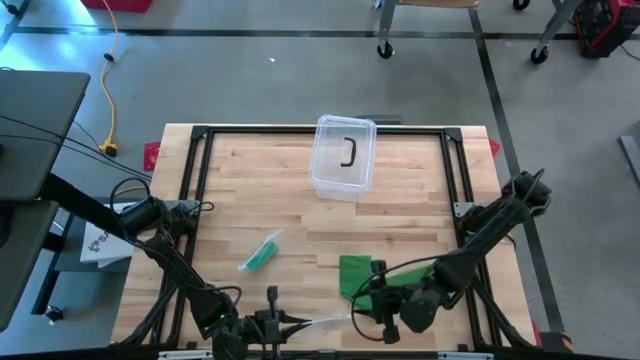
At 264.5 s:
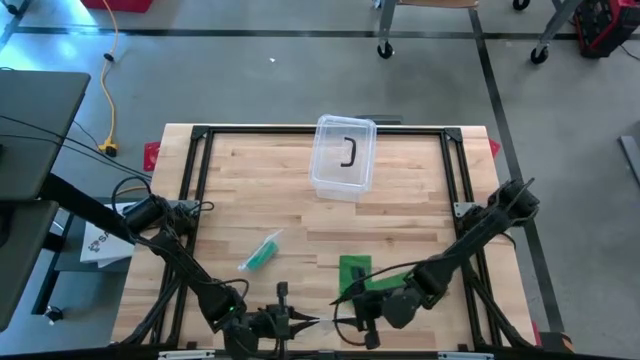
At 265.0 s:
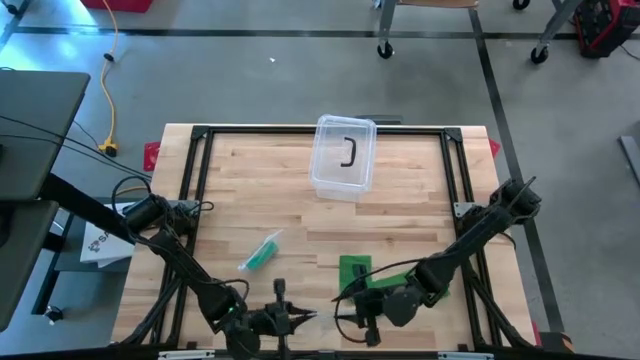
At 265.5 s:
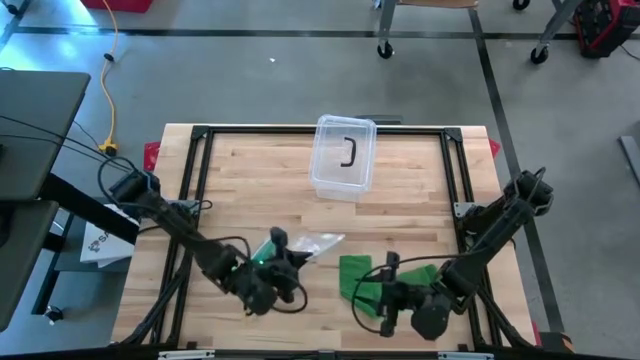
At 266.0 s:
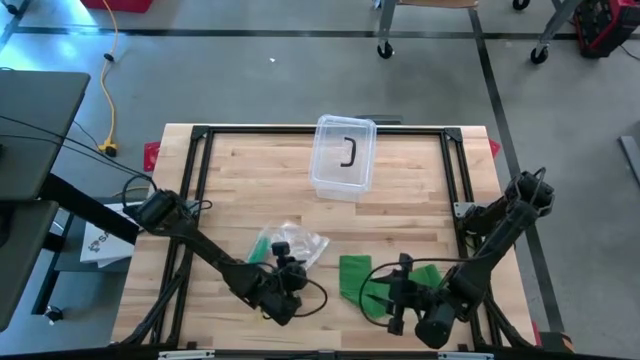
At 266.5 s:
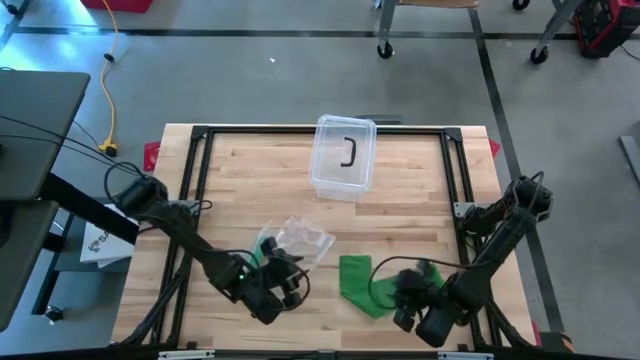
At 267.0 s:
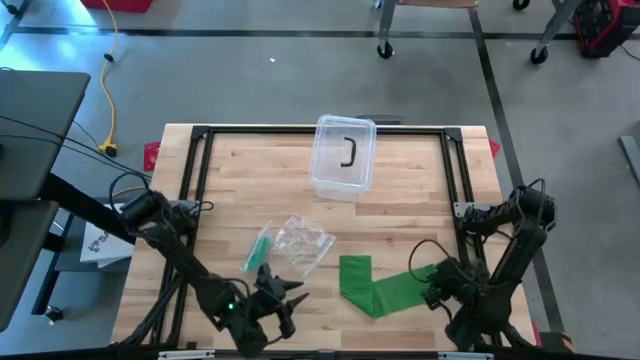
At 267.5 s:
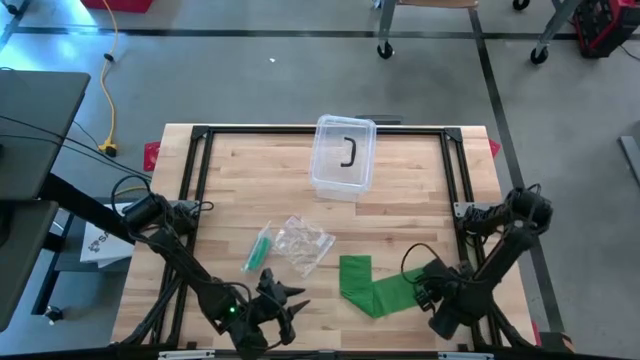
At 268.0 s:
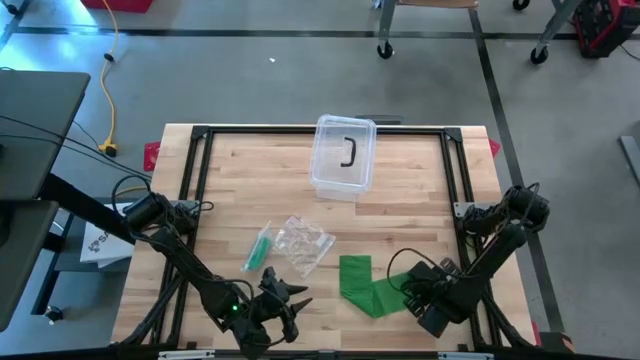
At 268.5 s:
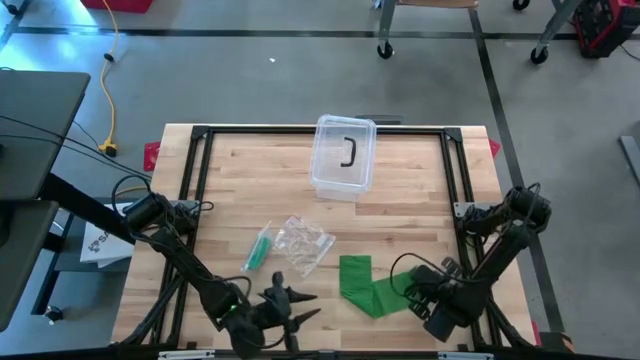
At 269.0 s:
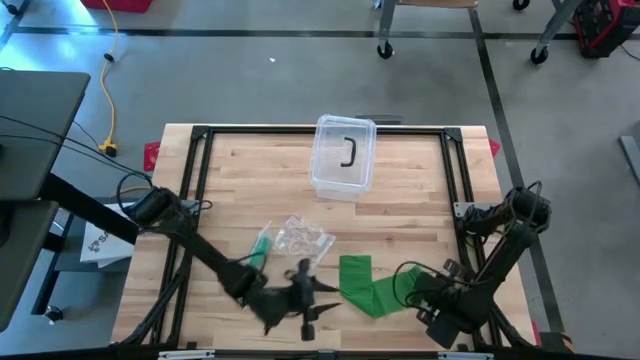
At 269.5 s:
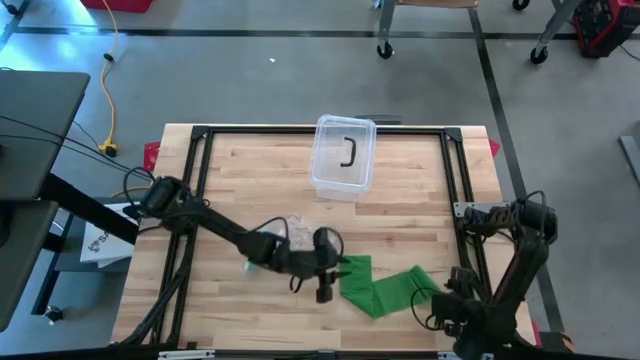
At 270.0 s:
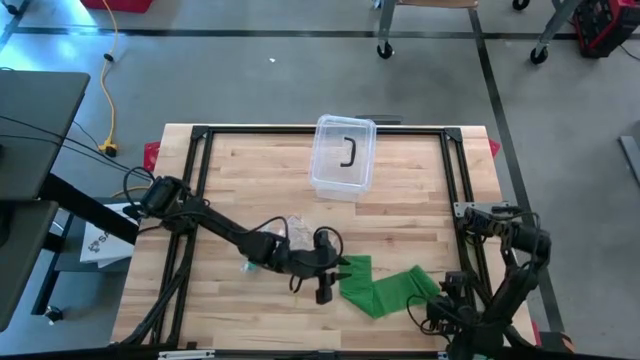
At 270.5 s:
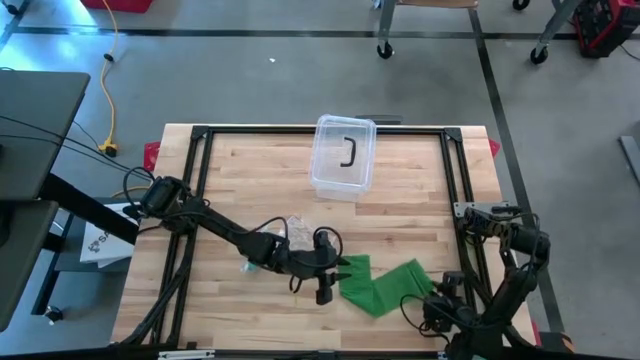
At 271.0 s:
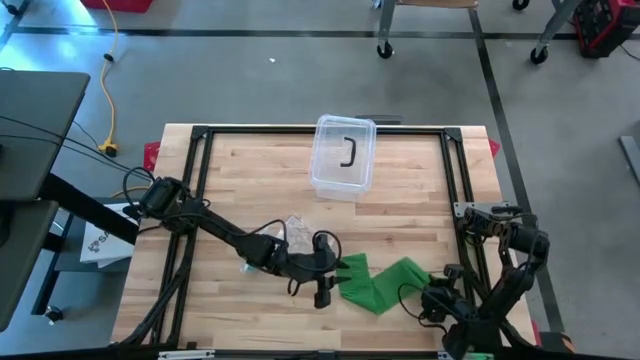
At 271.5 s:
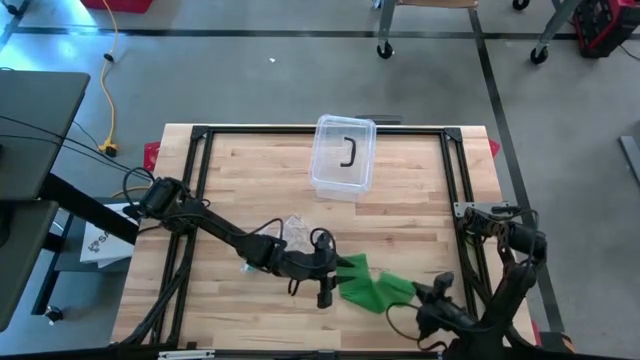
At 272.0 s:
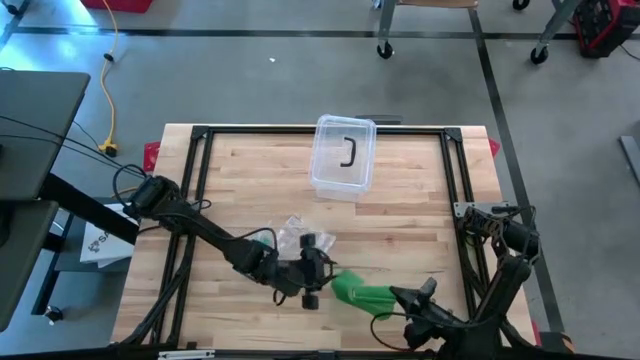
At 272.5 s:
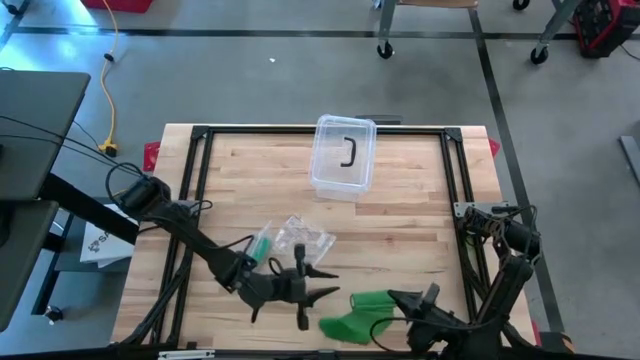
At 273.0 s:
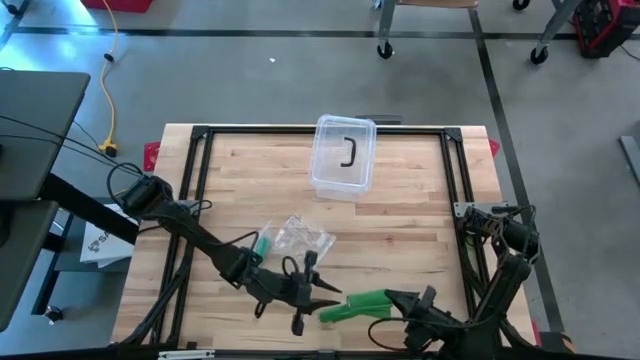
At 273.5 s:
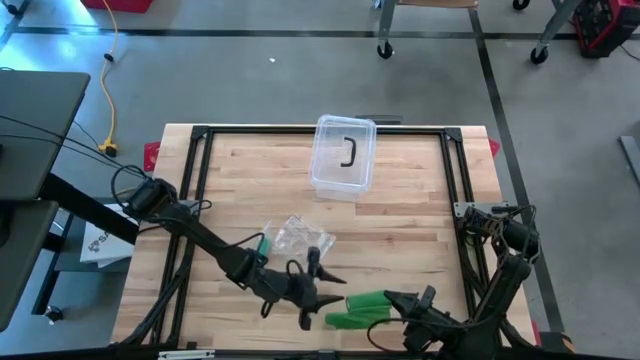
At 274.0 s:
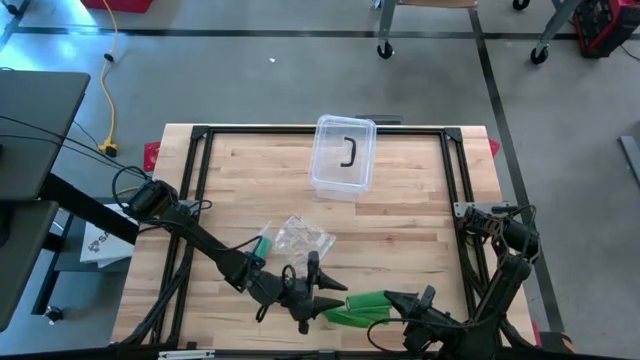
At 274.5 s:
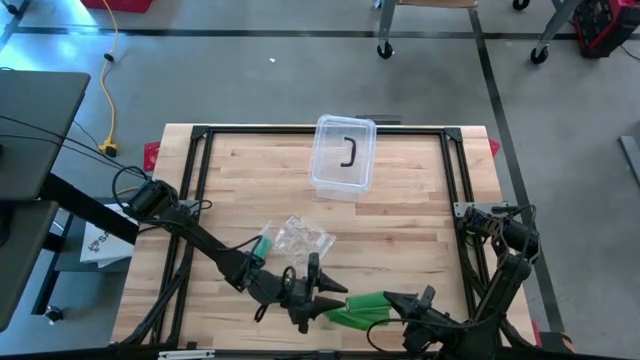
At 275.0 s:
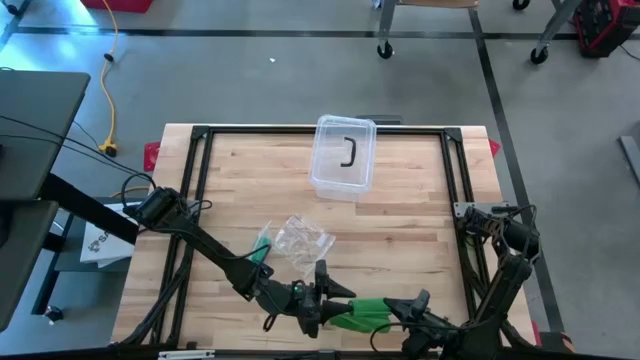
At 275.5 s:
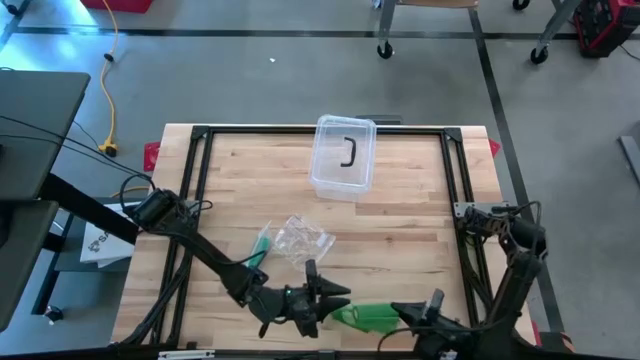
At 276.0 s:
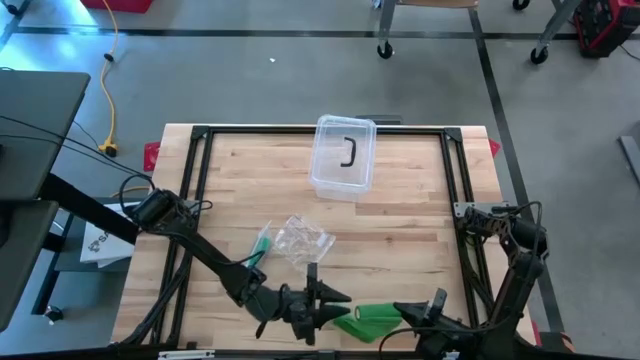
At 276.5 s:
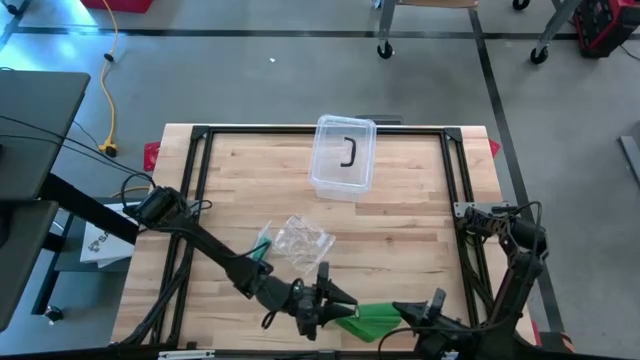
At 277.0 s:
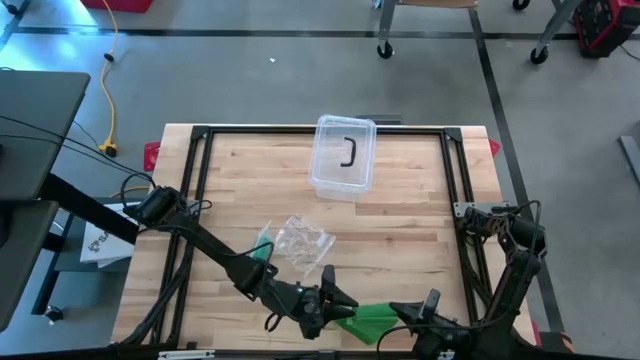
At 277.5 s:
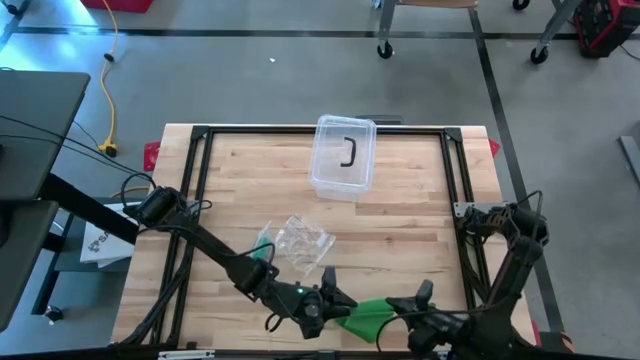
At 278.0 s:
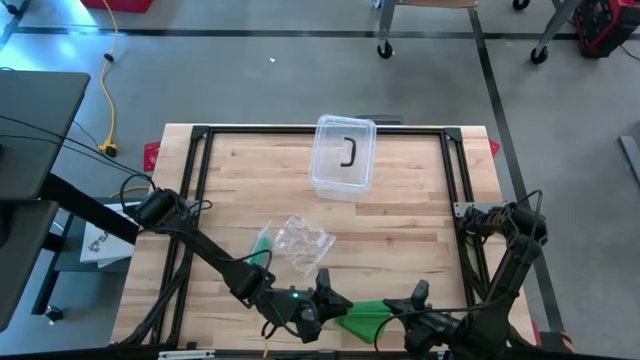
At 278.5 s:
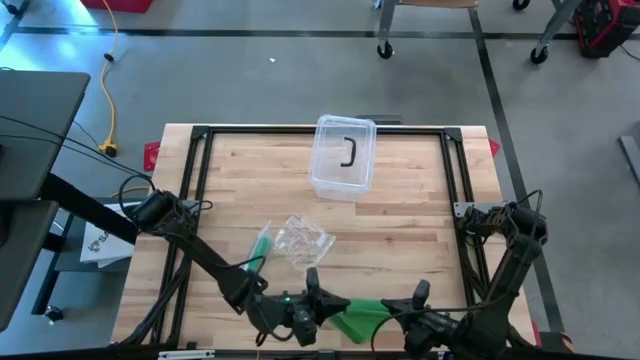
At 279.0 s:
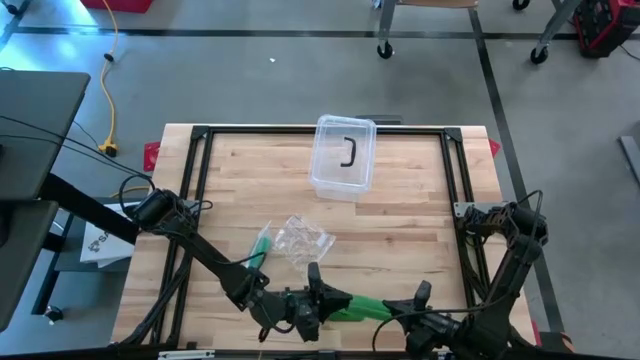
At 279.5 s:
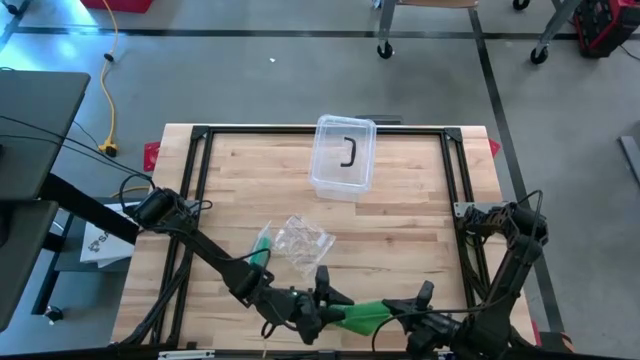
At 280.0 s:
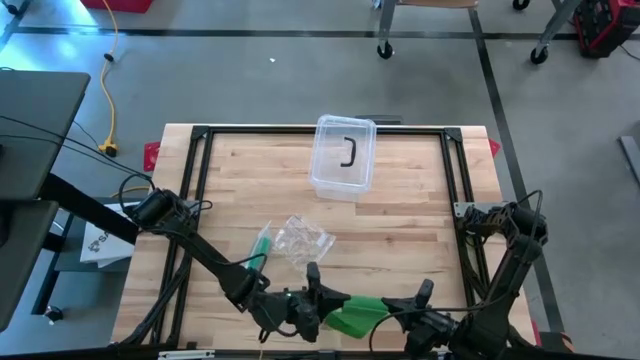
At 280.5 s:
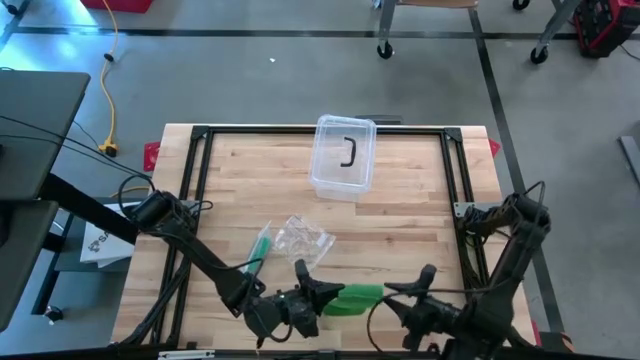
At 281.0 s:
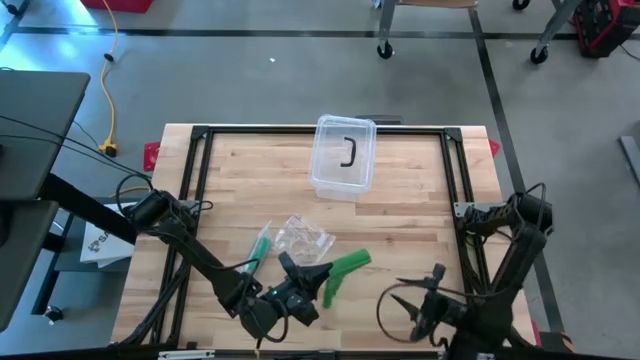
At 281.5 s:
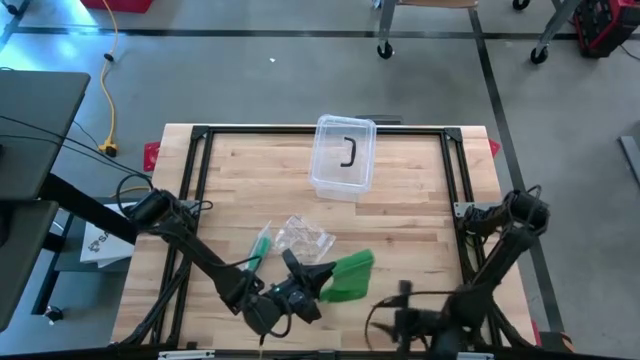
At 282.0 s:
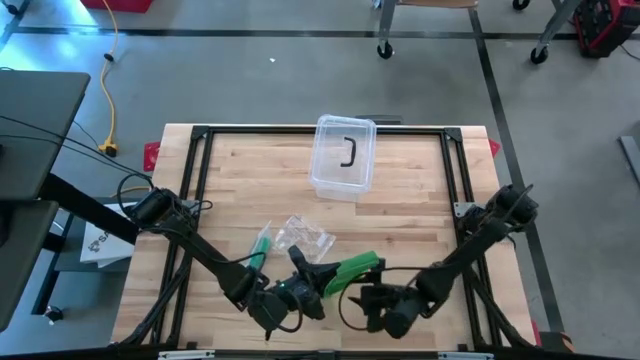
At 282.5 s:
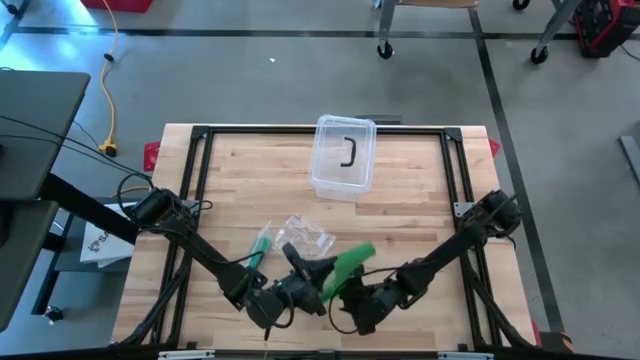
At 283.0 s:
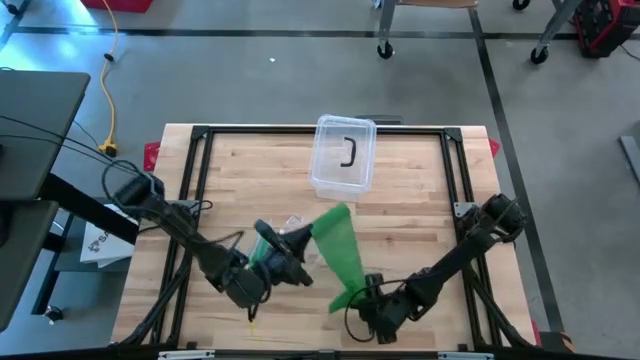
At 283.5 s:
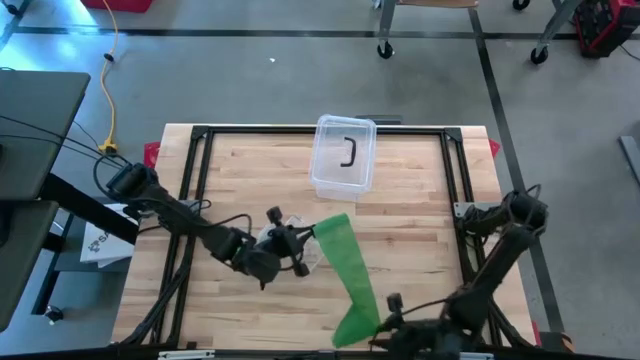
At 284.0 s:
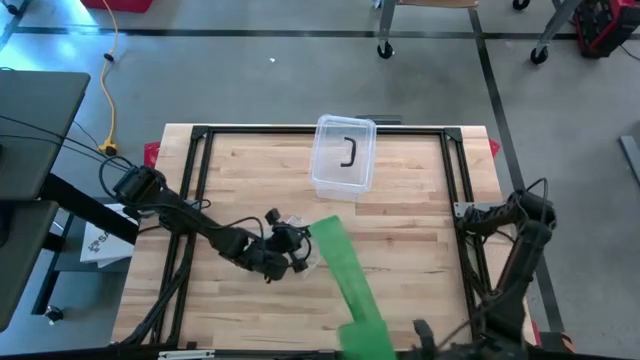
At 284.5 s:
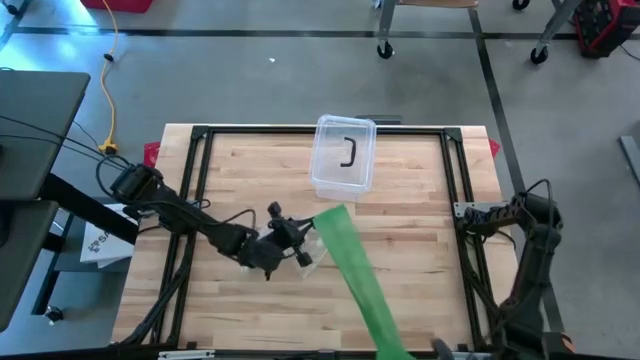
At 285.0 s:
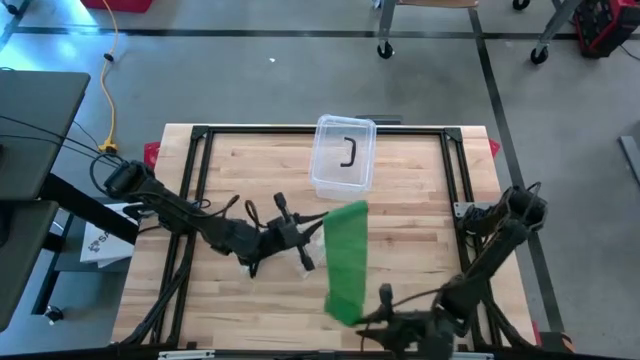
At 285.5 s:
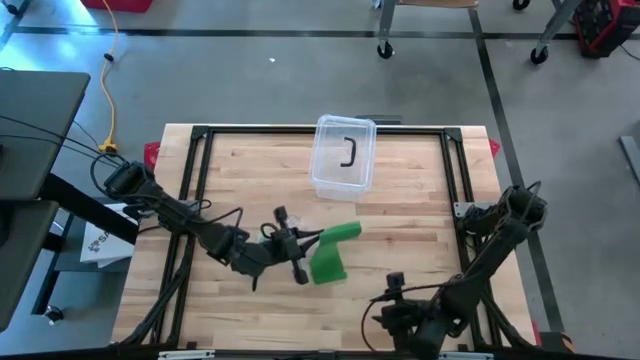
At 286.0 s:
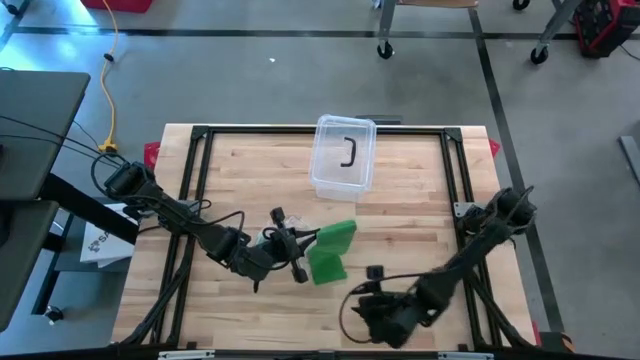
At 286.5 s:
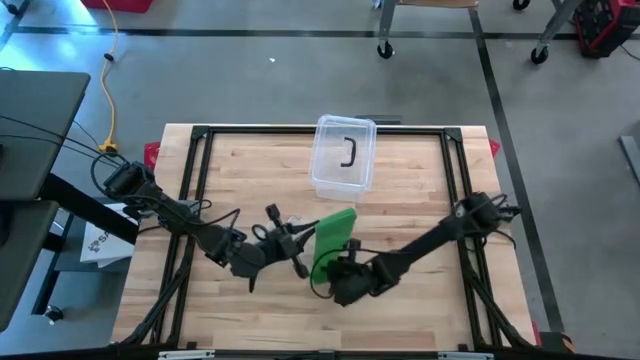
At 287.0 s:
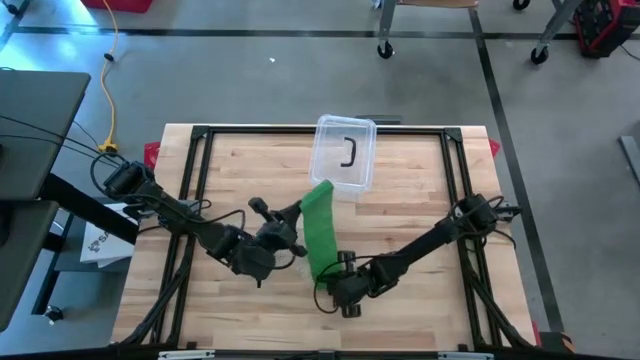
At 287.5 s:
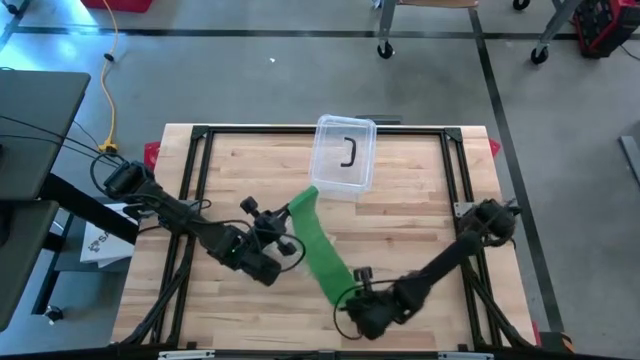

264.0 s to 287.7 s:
Task: Roll bandage
Roll the green bandage
